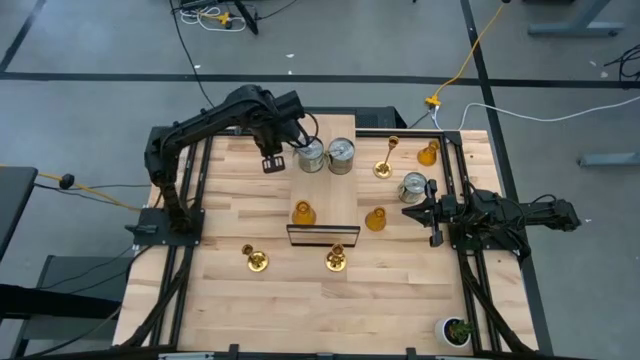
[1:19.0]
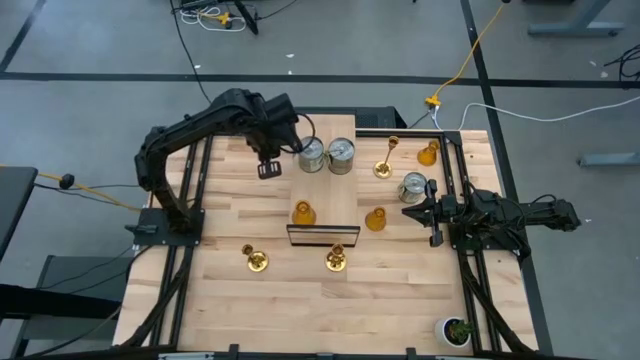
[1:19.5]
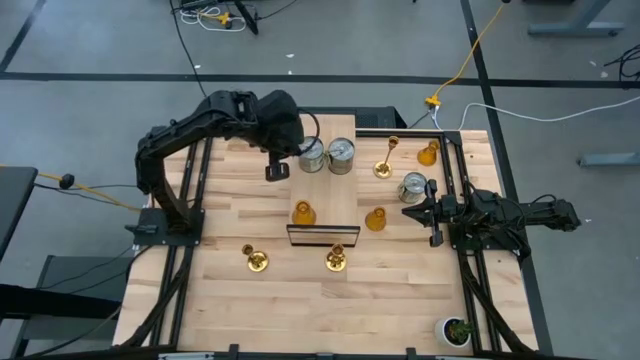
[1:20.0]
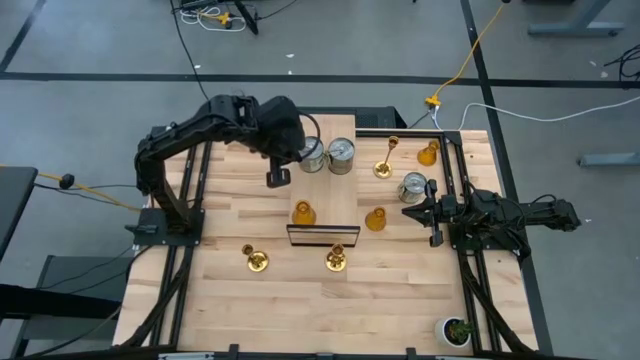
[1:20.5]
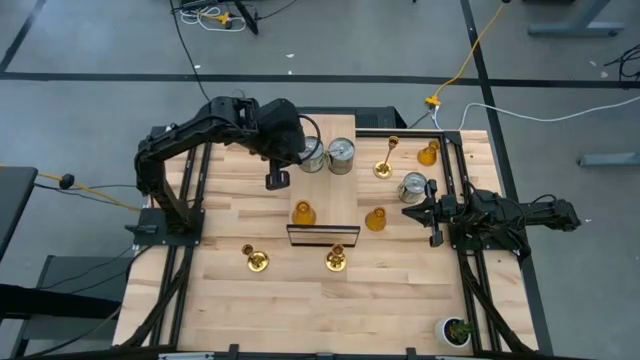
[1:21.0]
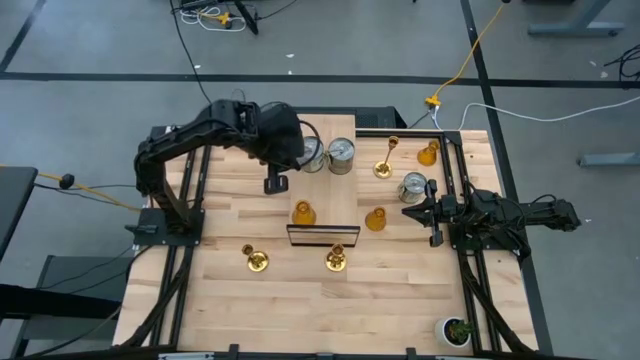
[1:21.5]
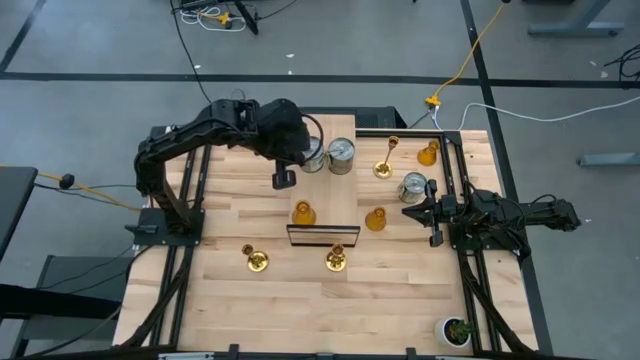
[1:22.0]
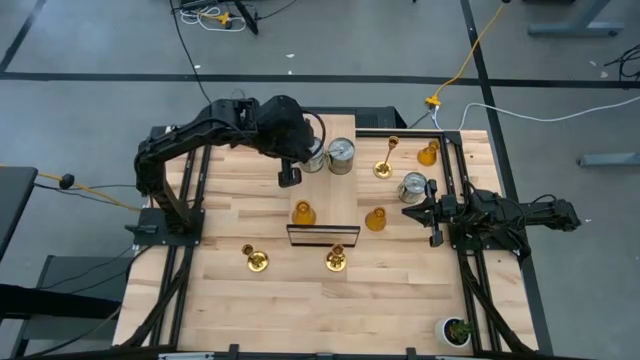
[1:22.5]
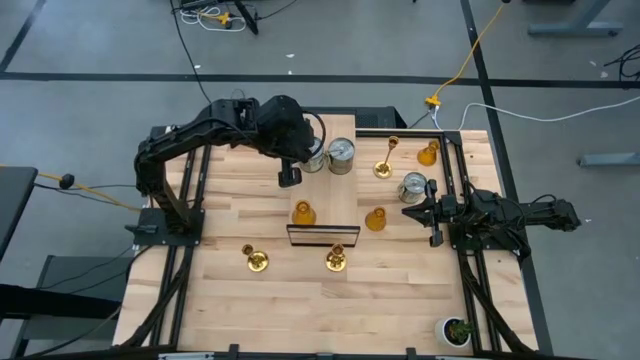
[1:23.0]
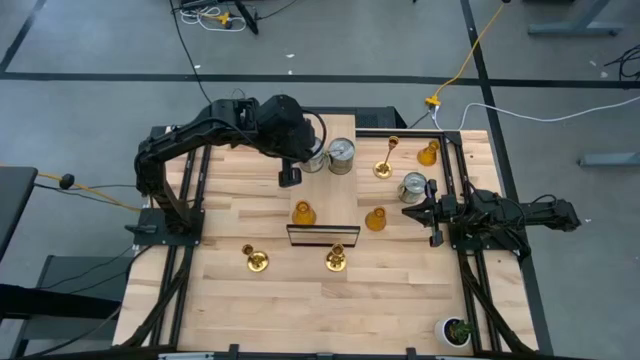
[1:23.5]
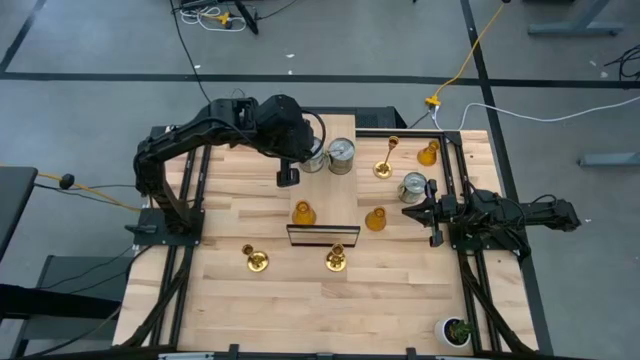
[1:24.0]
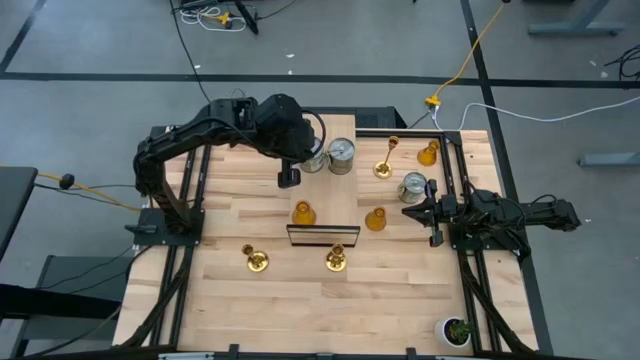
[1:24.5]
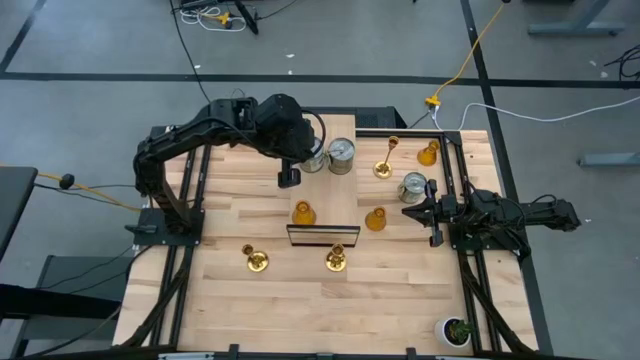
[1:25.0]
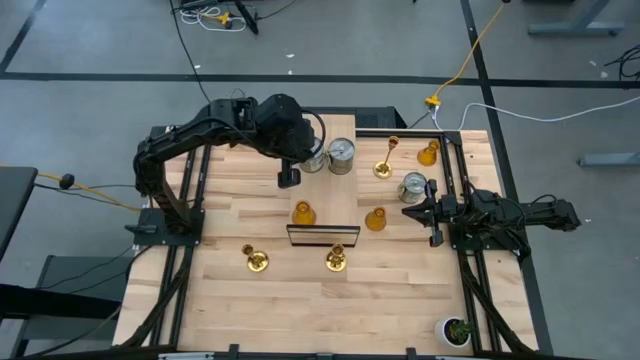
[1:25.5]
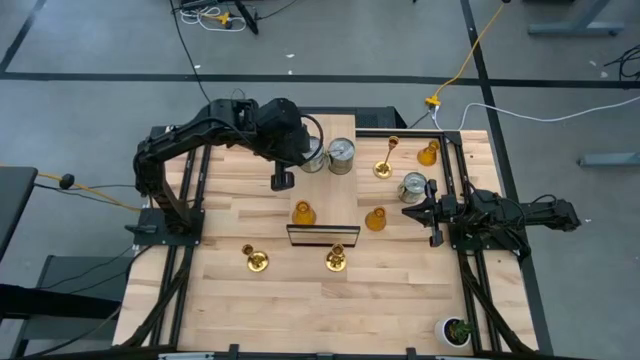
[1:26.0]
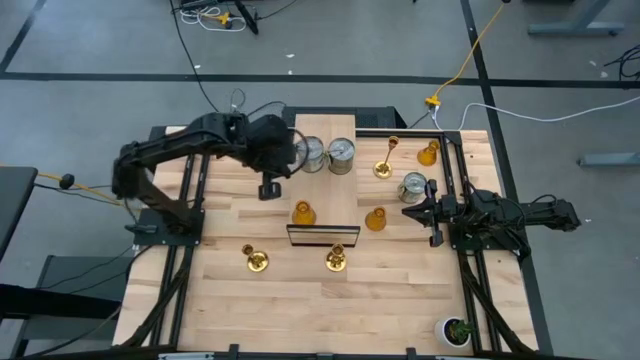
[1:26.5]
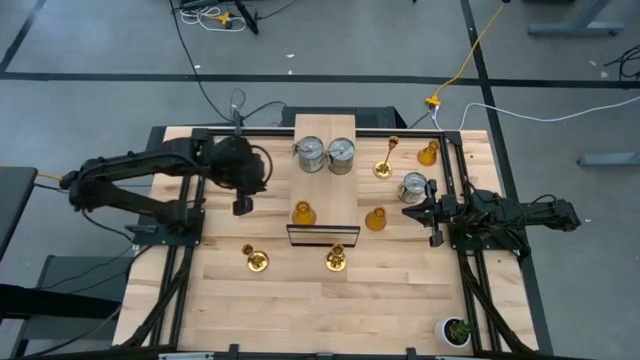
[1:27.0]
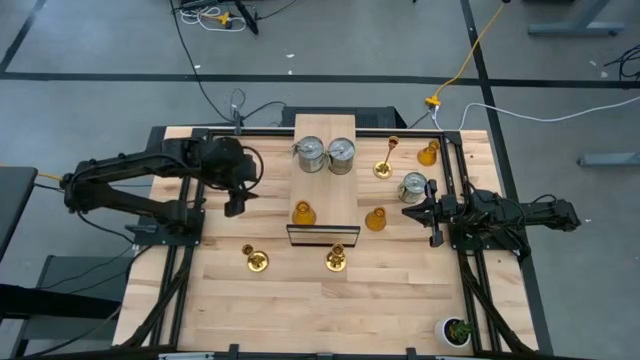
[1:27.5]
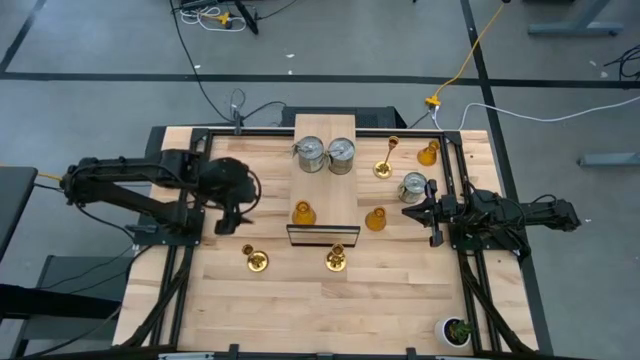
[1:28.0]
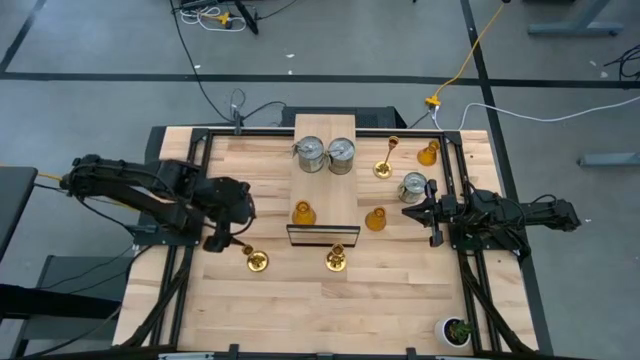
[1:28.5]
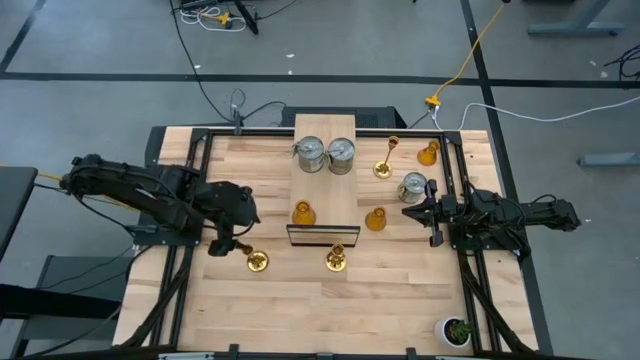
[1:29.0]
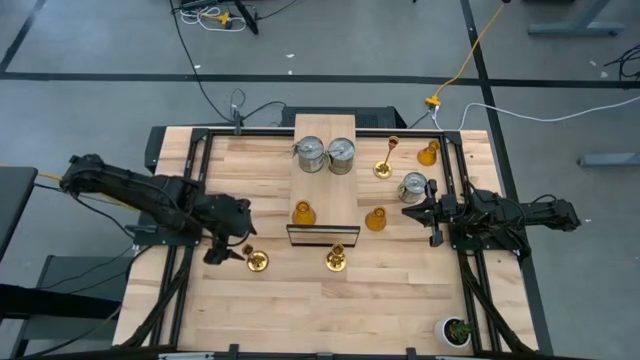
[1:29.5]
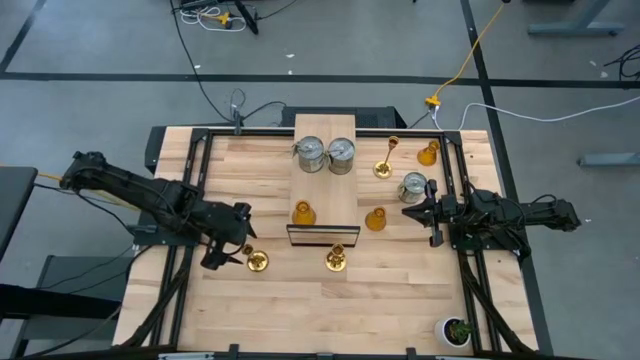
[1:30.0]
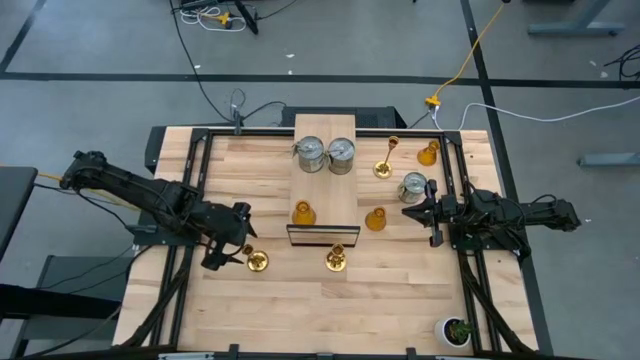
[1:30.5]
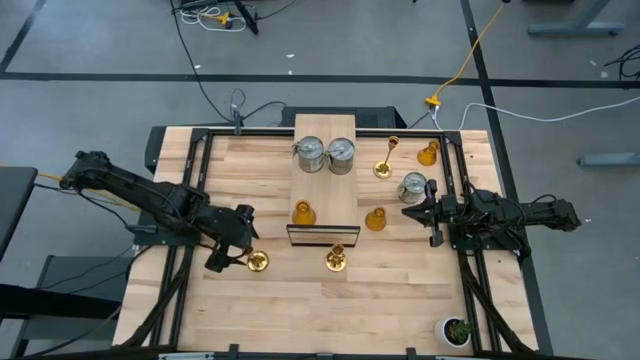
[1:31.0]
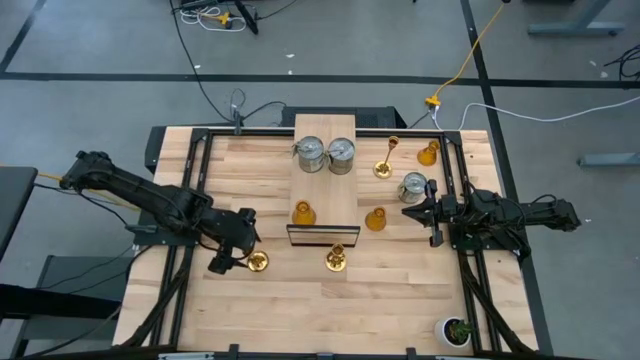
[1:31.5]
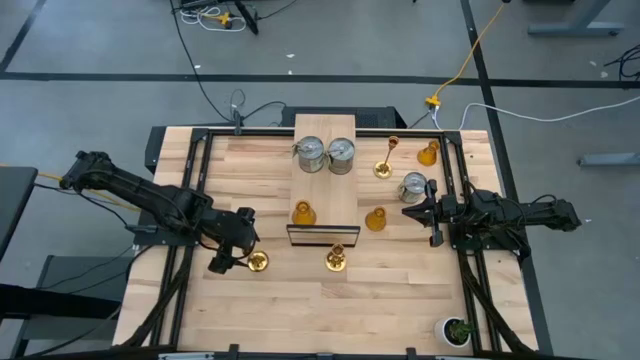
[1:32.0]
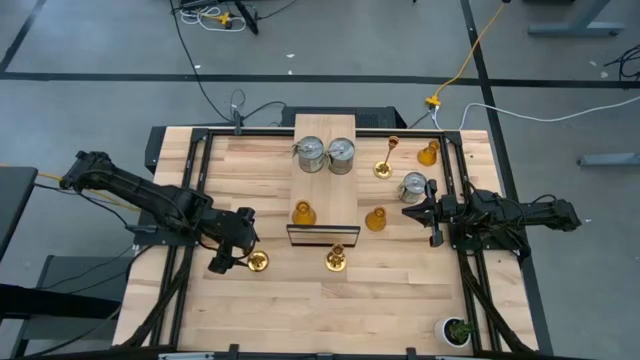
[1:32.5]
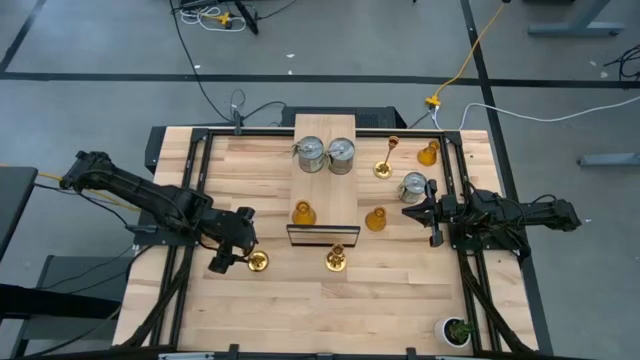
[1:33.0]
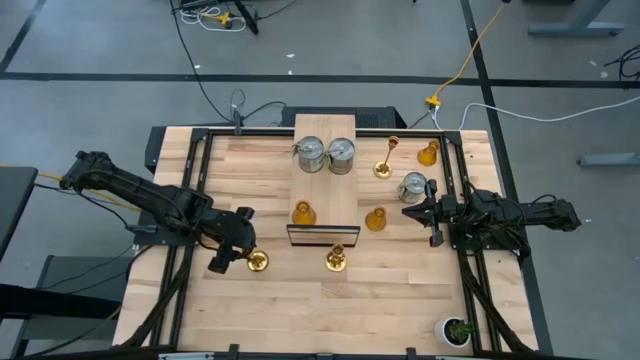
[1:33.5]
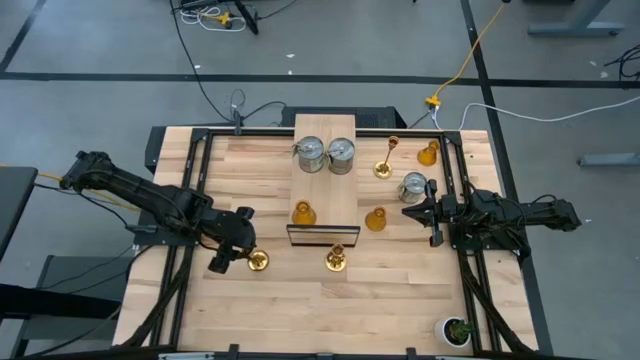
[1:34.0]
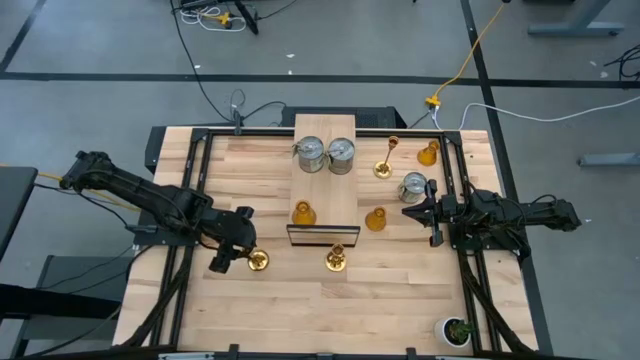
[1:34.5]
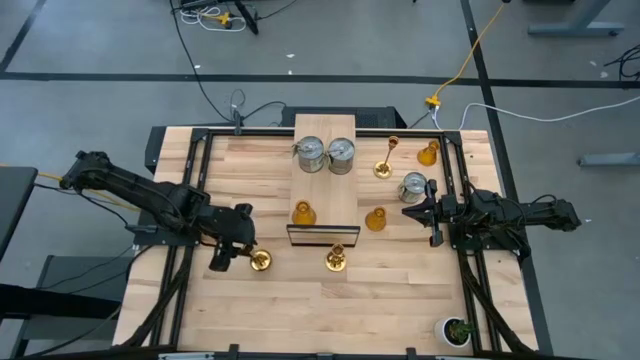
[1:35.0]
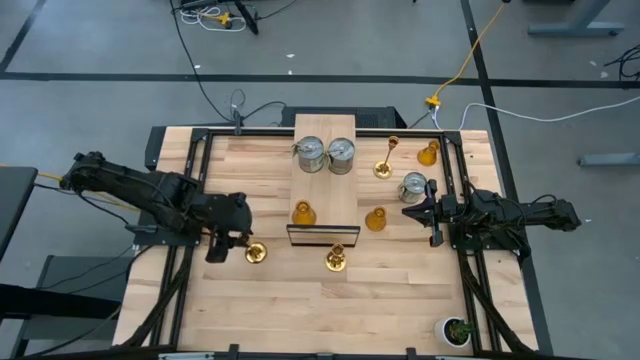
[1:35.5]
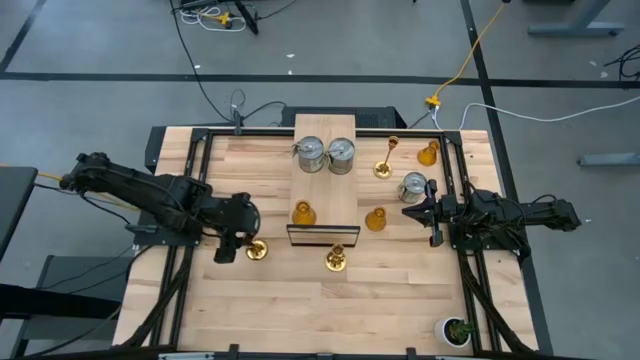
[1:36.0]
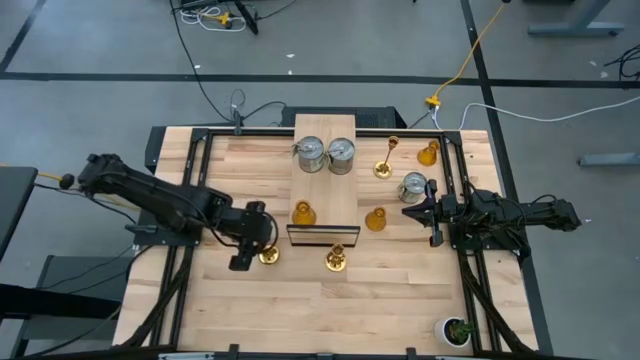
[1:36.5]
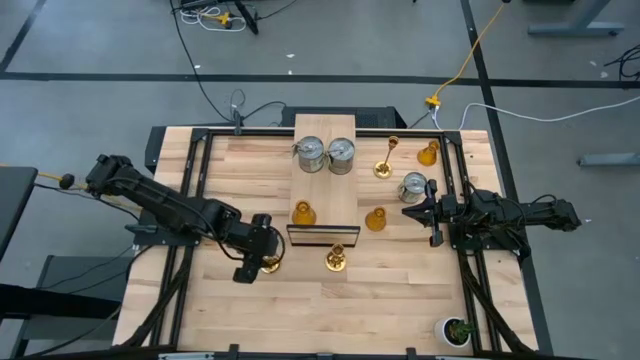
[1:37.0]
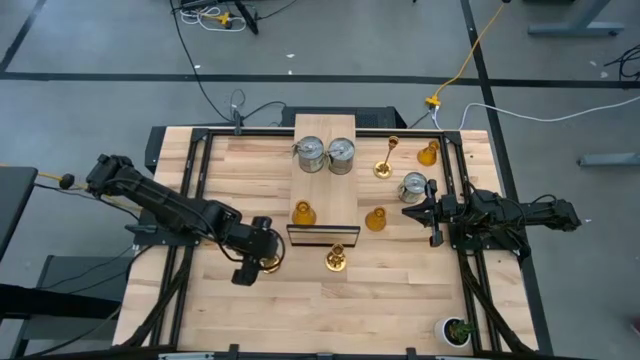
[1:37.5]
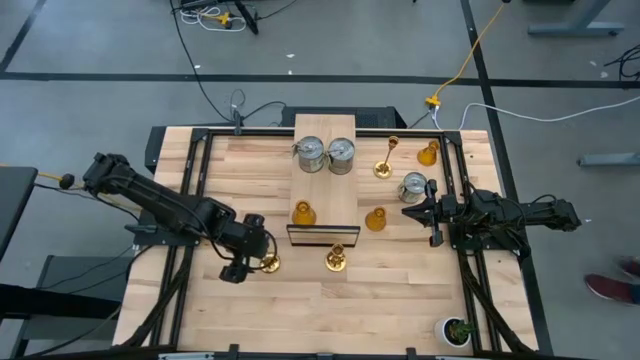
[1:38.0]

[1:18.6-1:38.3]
Task: Pick & Place candle stick holders
Put the bottom left gold candle holder on the shelf

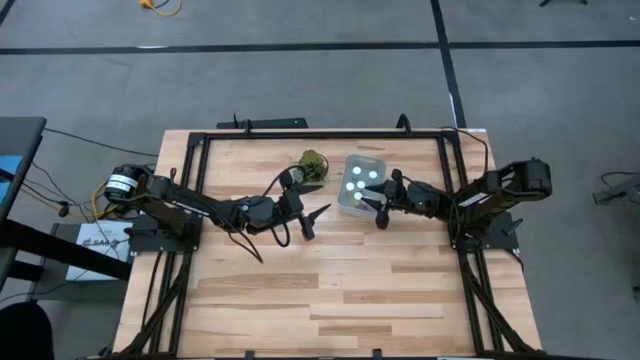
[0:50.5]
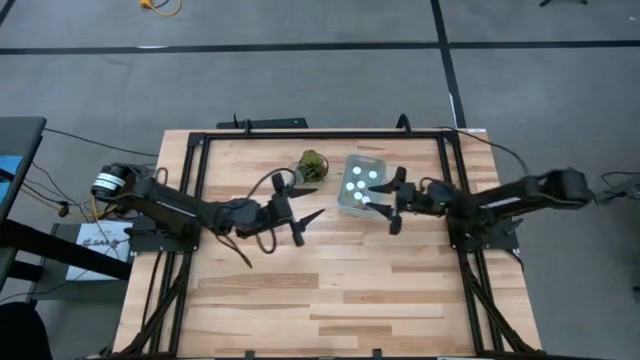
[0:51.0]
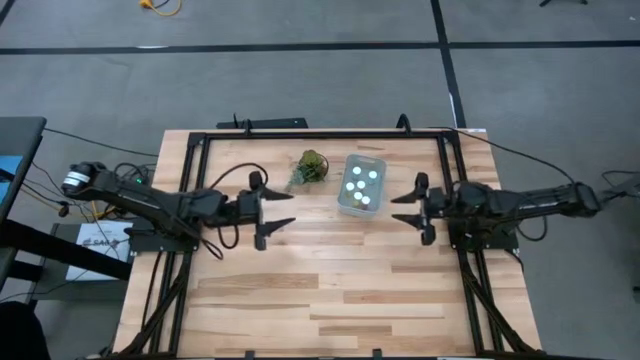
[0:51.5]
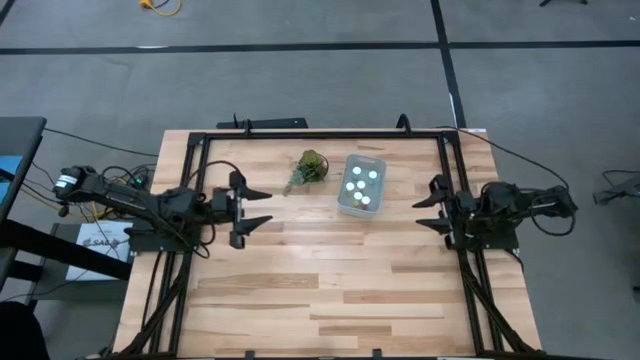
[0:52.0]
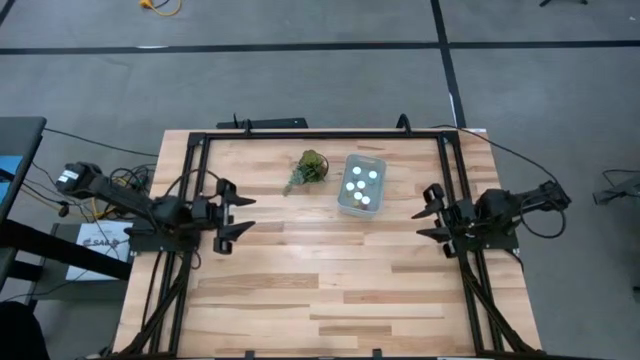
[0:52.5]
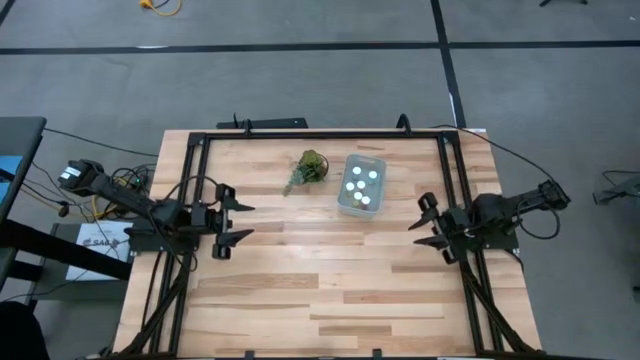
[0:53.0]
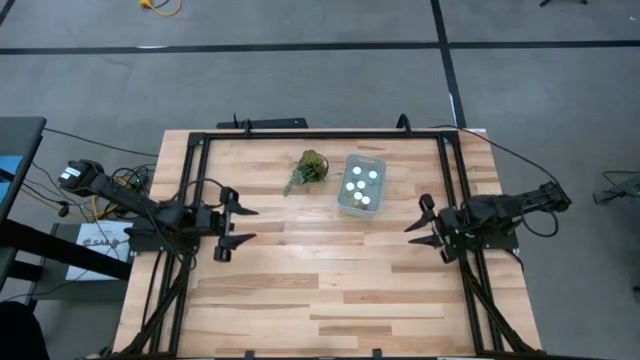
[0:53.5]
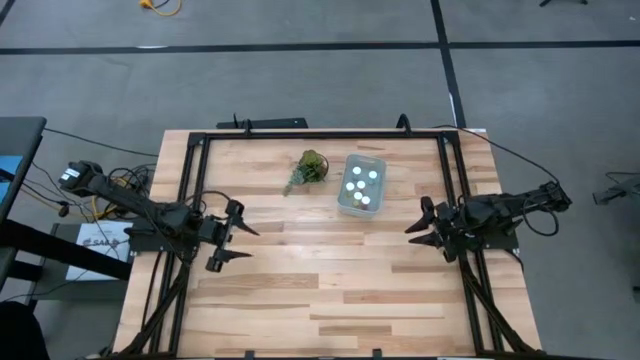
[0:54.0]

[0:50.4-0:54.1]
Task: Pick and place pill bottles into a basket
Return to Home Position
